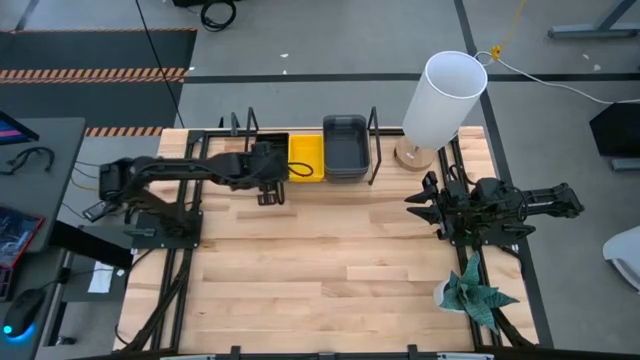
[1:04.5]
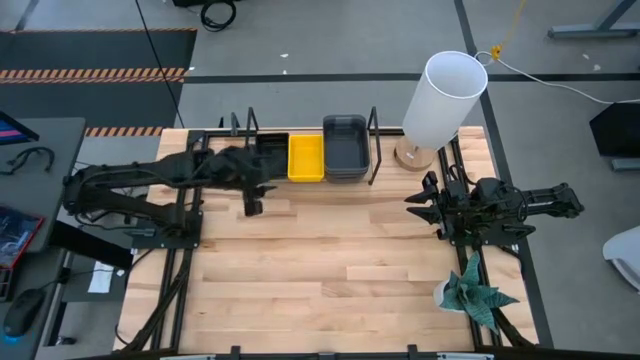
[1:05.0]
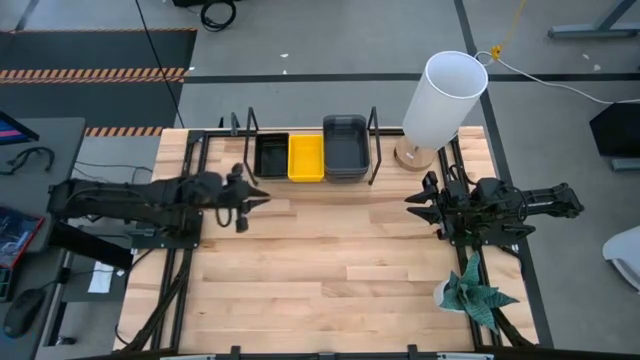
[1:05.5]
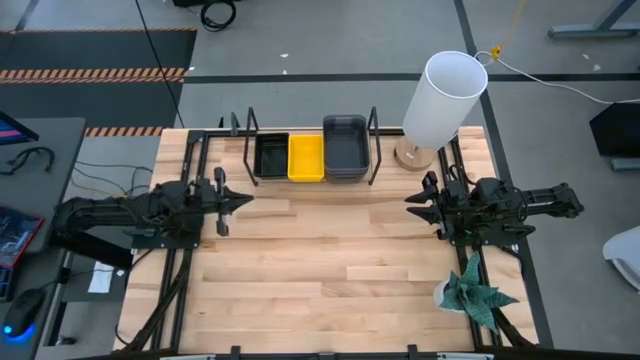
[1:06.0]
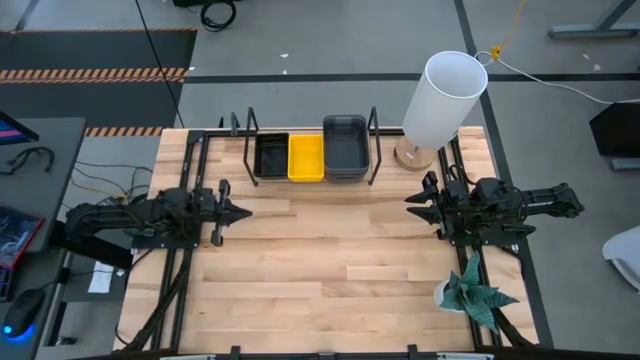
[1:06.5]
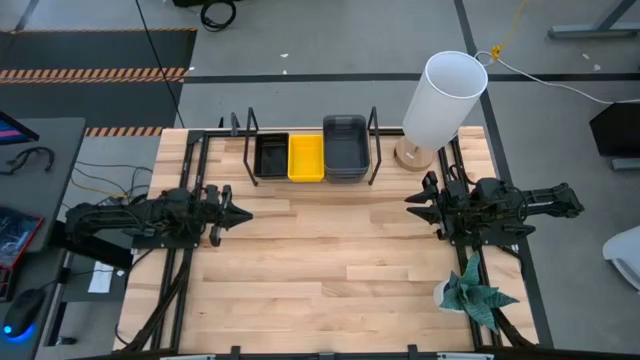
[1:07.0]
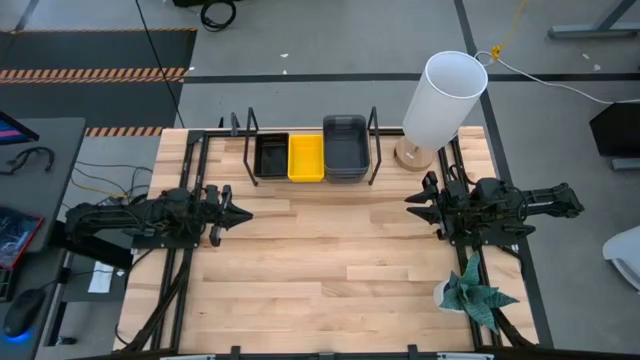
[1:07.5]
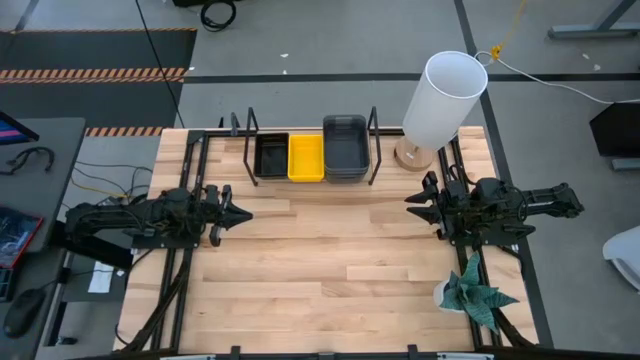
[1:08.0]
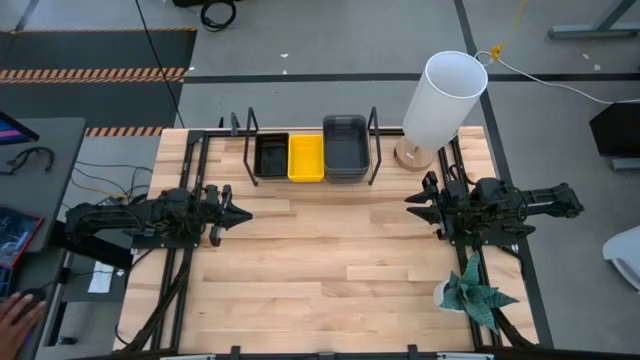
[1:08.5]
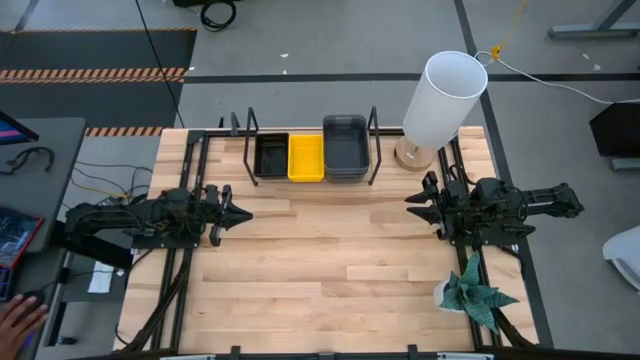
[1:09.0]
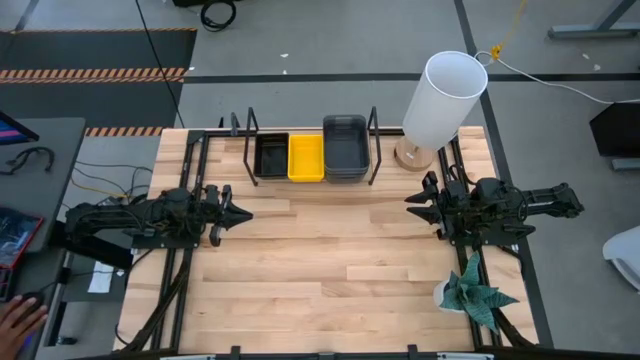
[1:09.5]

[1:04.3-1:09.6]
Task: Stack baskets on shelf by color
Return to Home Position

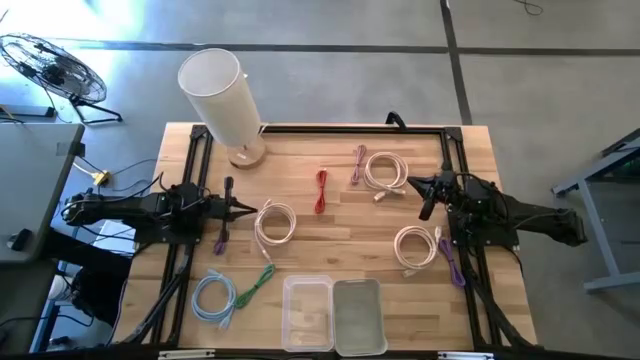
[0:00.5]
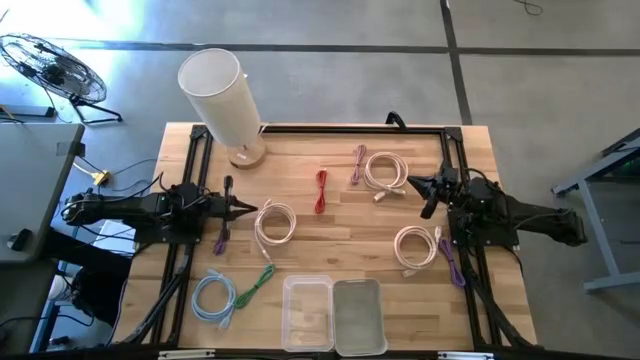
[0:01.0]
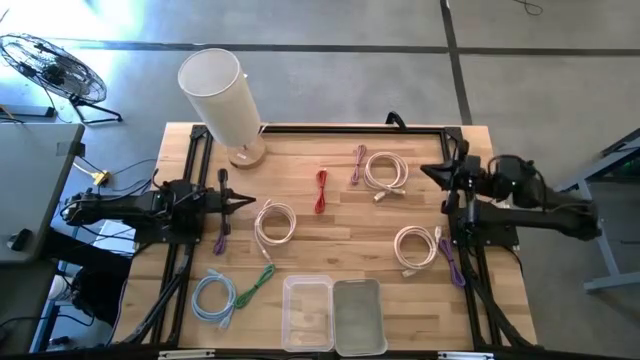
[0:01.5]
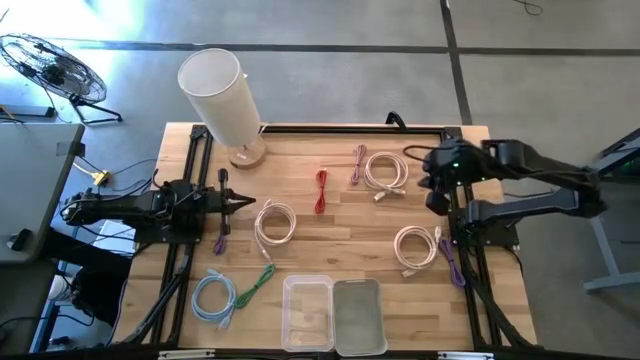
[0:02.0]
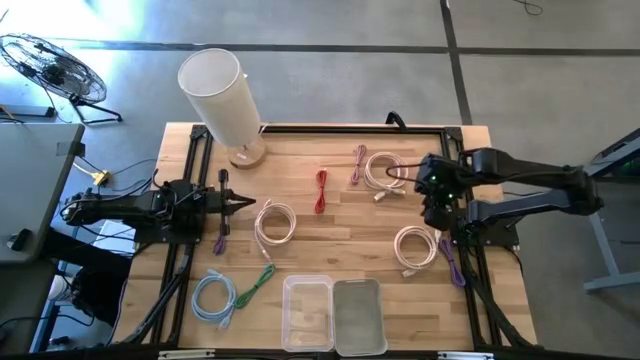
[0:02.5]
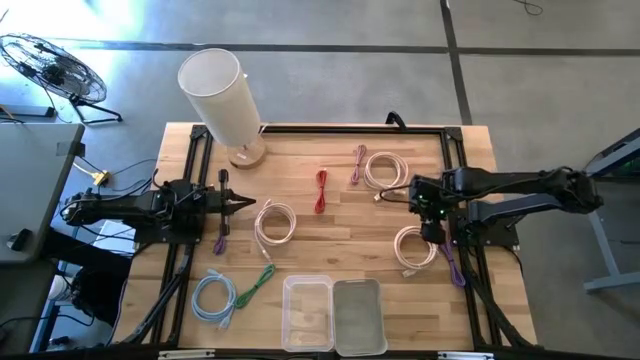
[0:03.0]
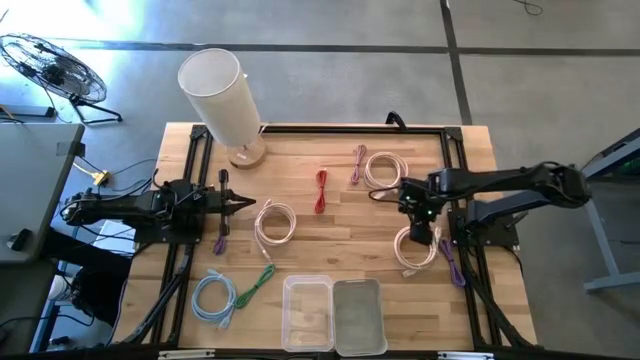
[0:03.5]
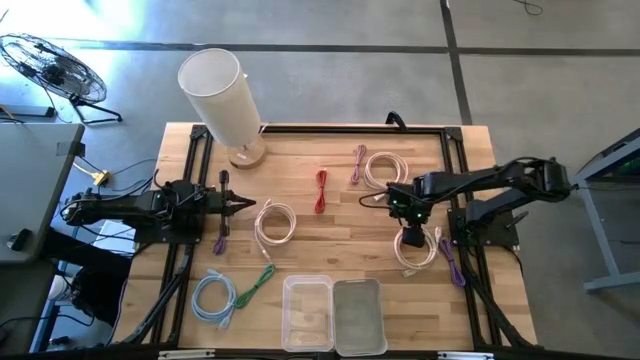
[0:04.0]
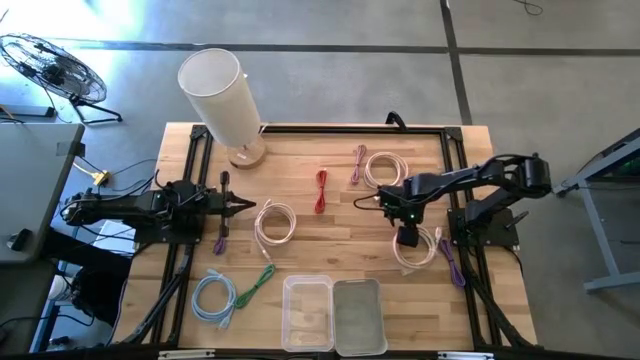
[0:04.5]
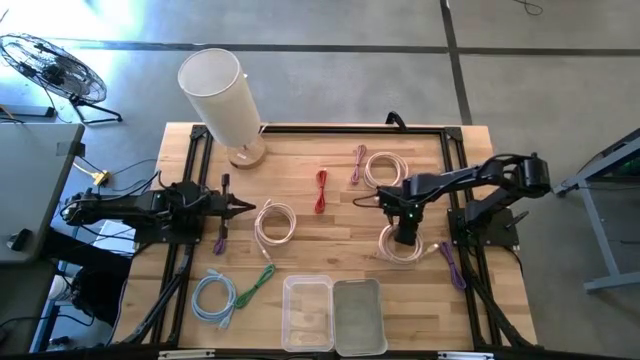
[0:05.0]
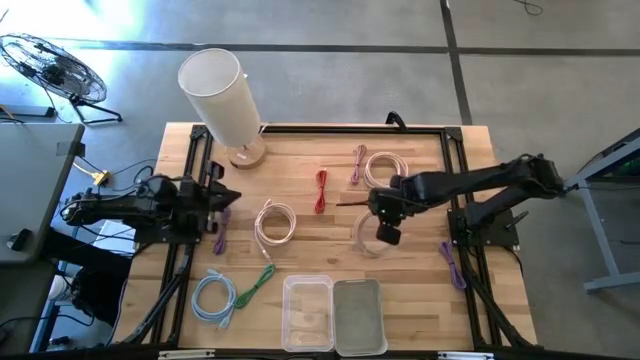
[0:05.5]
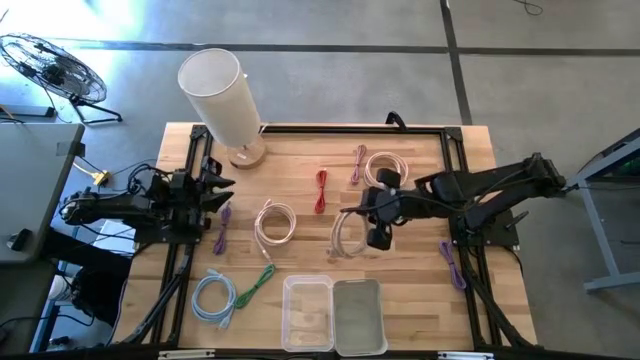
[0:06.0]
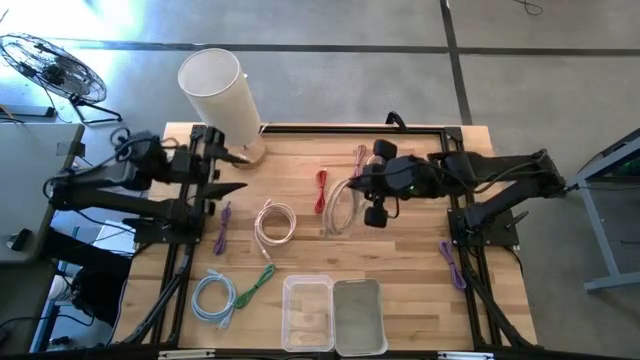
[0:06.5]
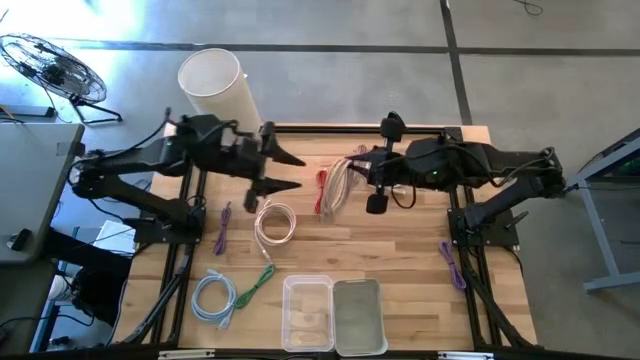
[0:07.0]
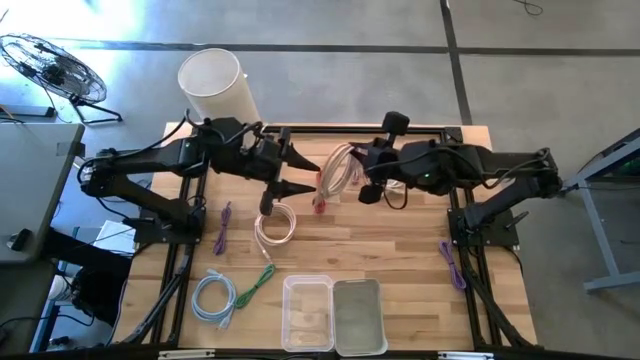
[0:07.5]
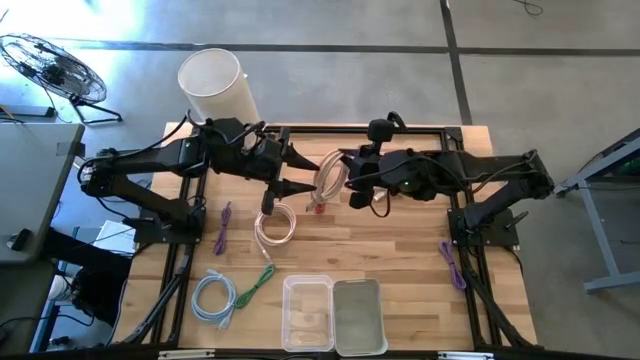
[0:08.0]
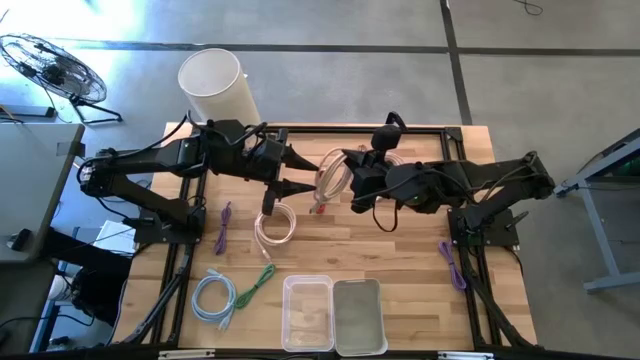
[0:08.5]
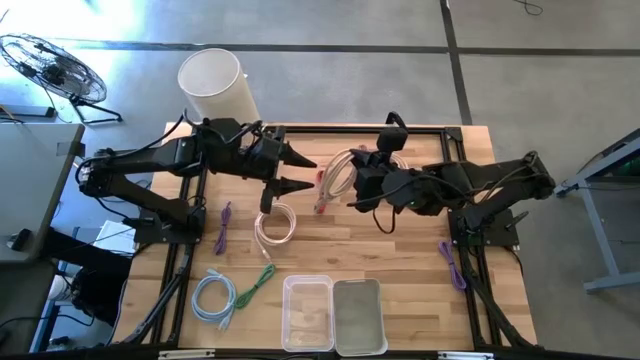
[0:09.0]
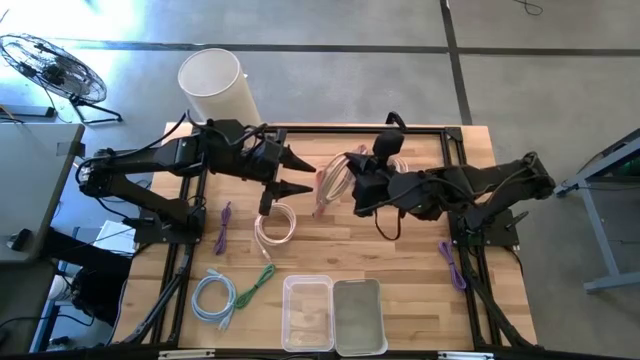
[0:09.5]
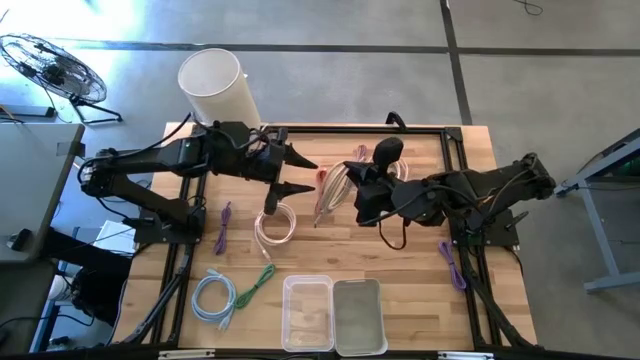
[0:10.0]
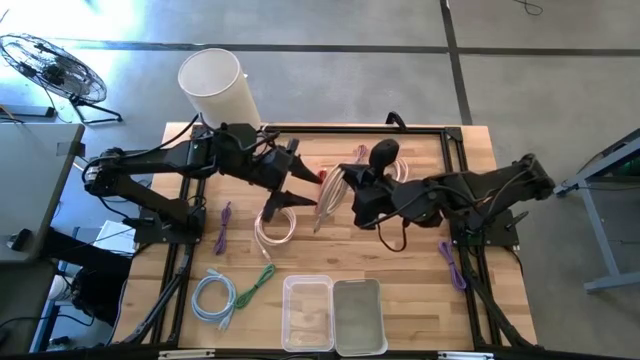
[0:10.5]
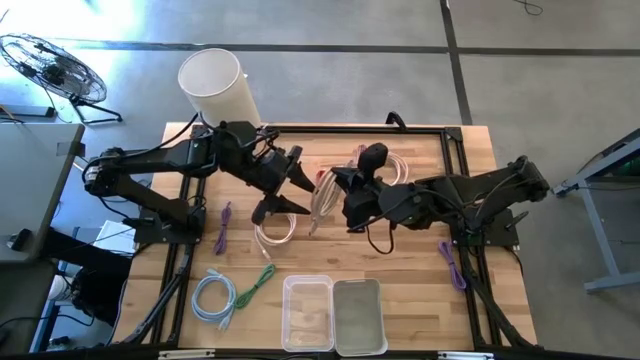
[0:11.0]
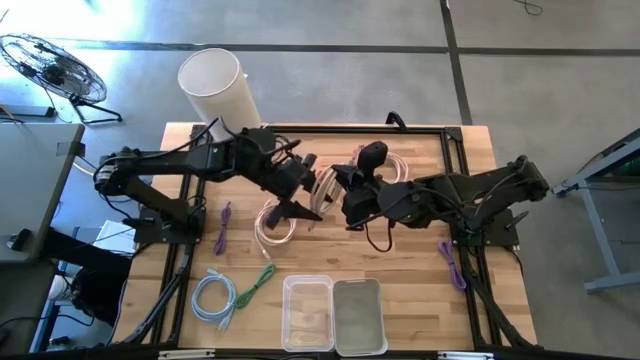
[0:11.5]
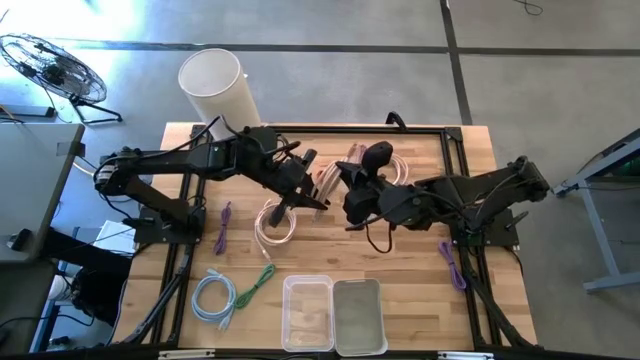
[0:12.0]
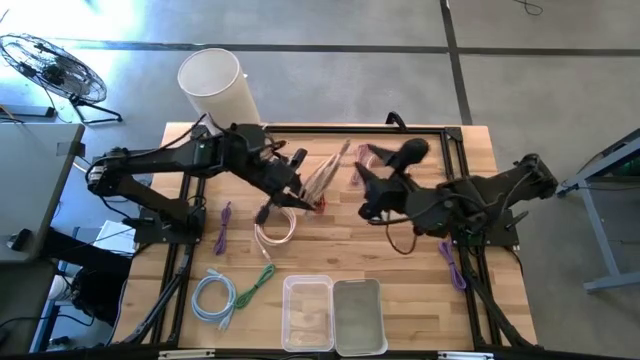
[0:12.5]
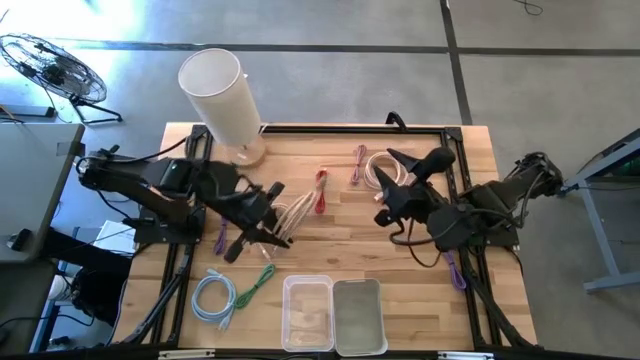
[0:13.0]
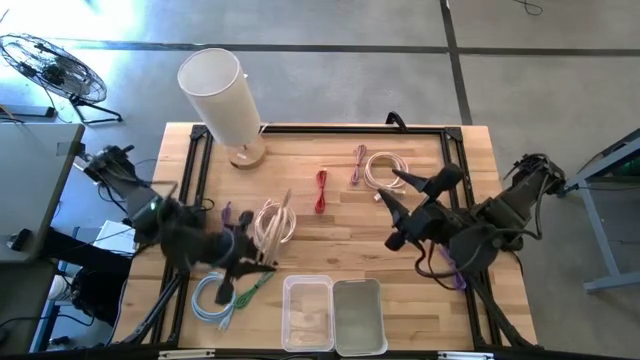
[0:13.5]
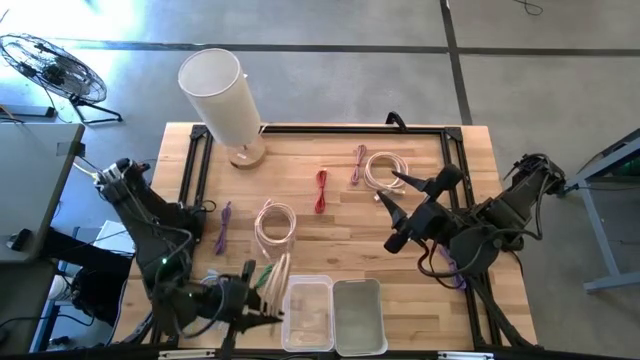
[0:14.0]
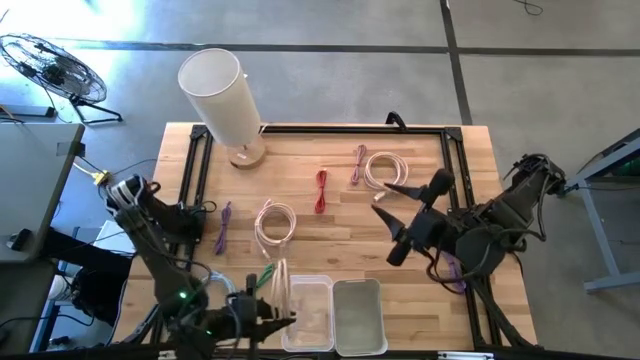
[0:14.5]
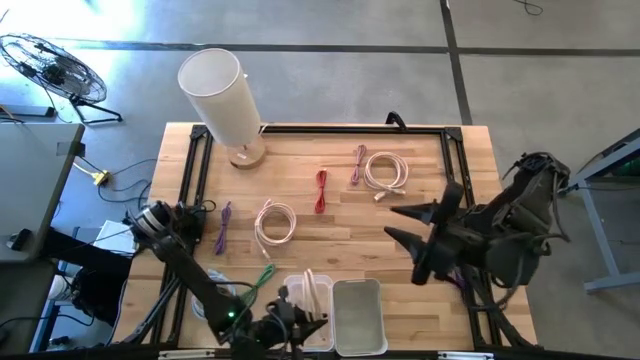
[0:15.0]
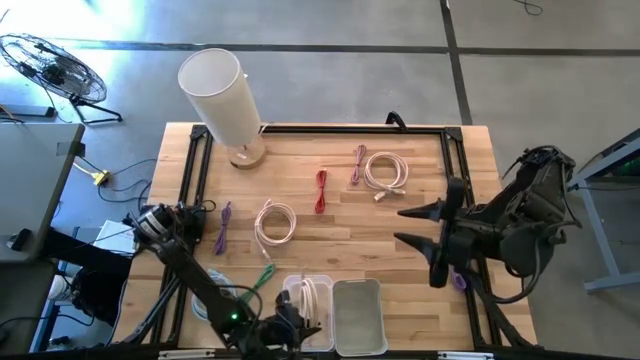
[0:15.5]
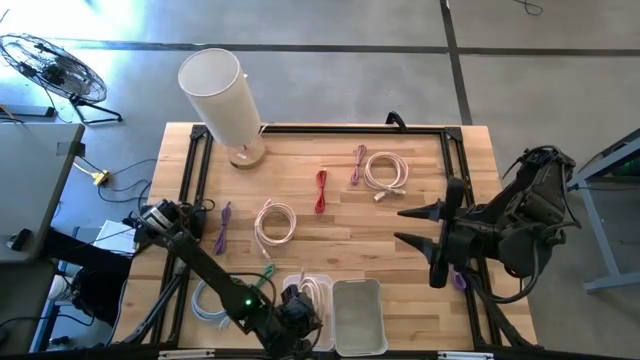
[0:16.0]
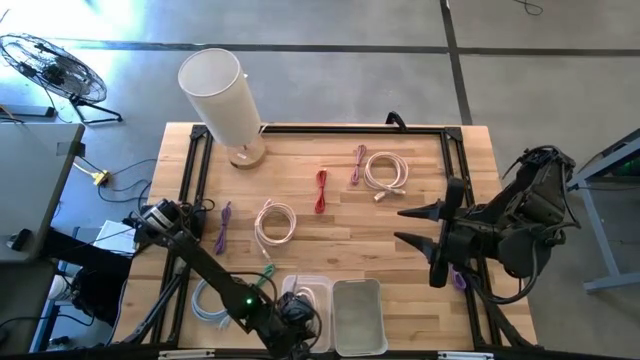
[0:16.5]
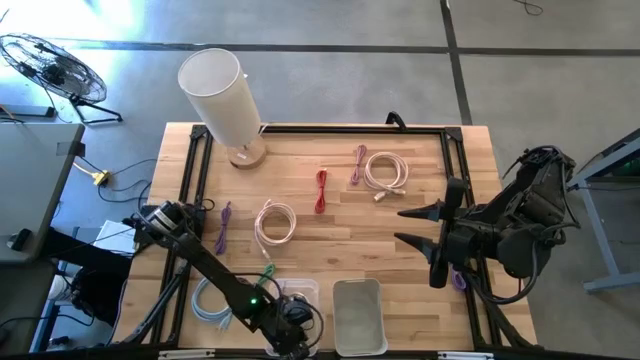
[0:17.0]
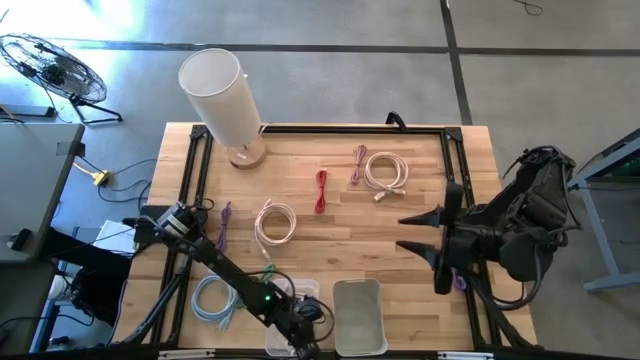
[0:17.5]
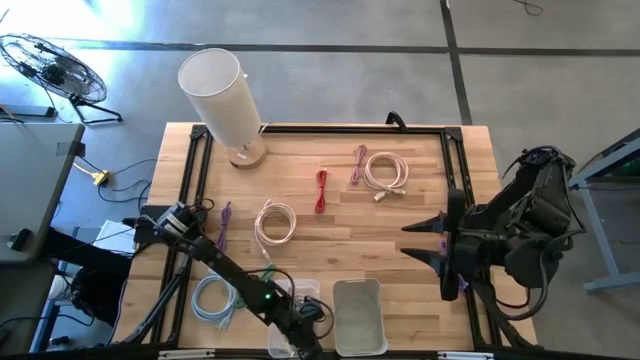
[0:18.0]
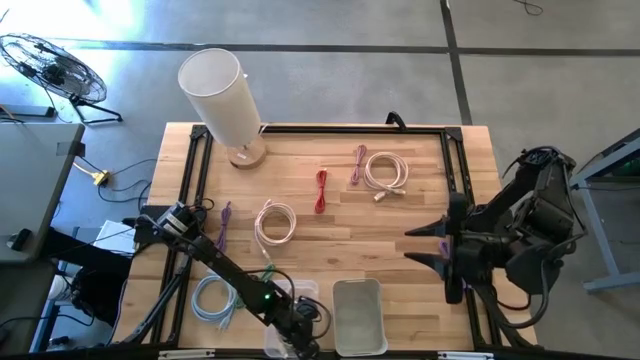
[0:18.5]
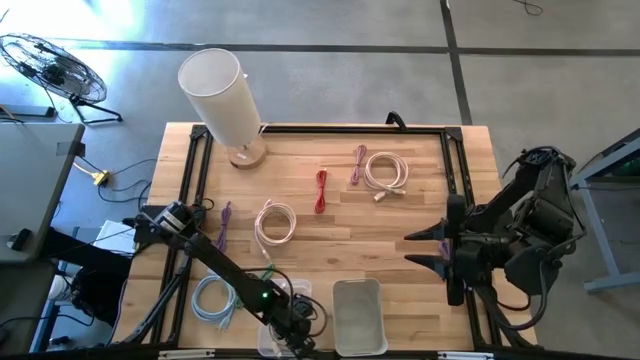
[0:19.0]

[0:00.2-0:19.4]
Task: Pick & Place USB Port
Put the bottom right pink HDMI cable into the transparent bin
